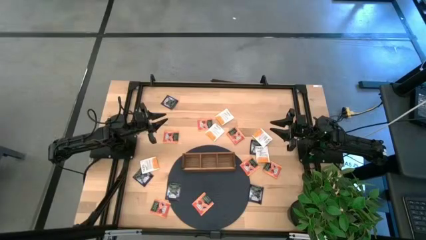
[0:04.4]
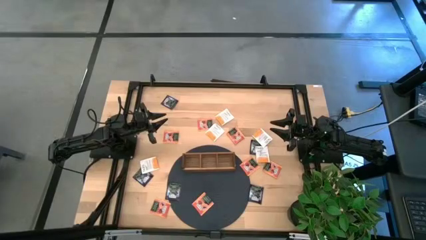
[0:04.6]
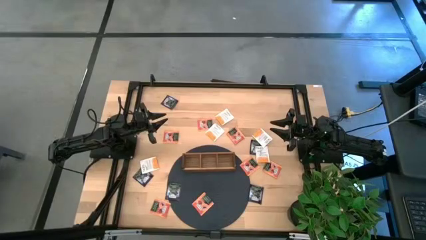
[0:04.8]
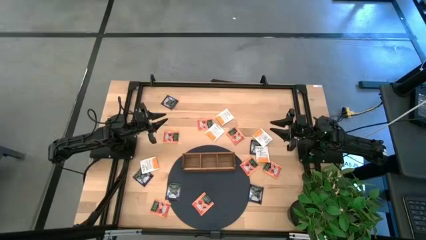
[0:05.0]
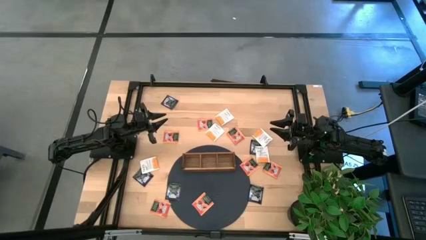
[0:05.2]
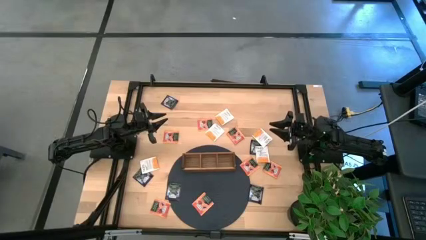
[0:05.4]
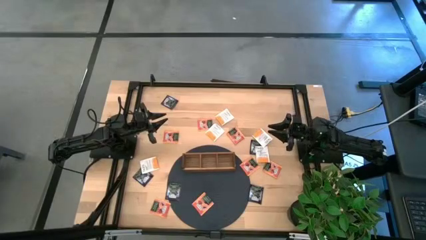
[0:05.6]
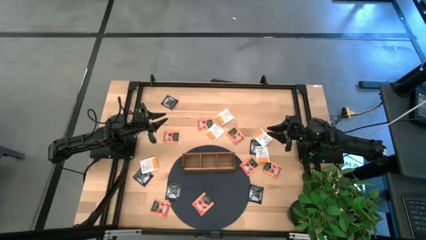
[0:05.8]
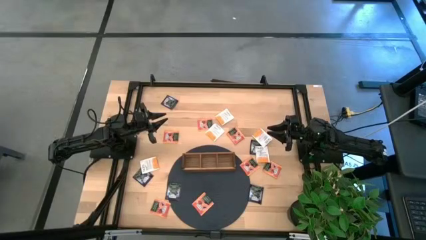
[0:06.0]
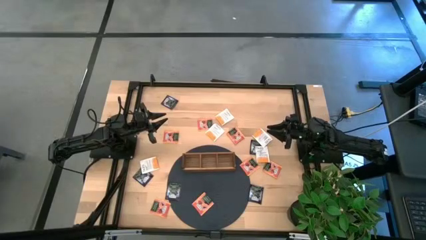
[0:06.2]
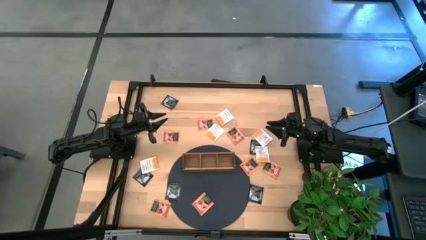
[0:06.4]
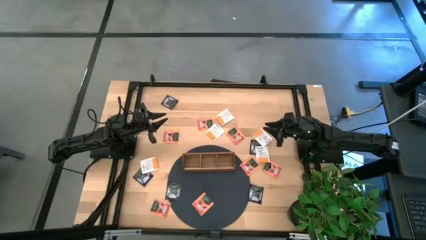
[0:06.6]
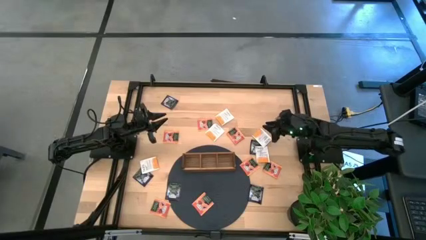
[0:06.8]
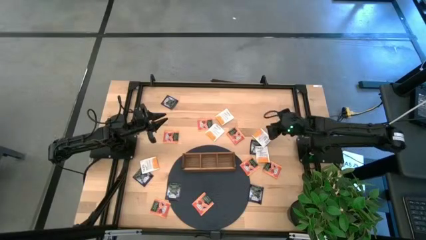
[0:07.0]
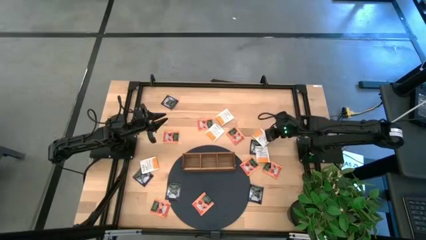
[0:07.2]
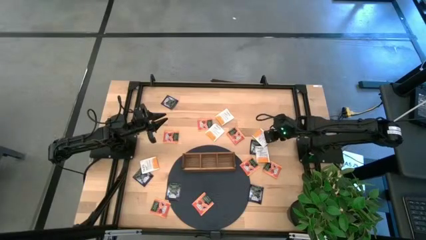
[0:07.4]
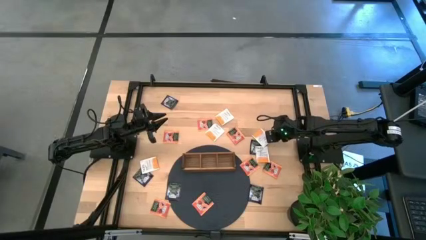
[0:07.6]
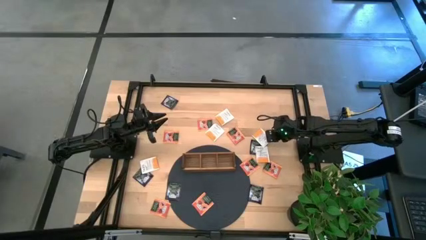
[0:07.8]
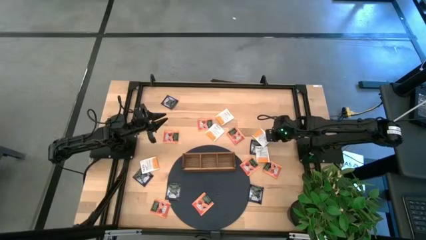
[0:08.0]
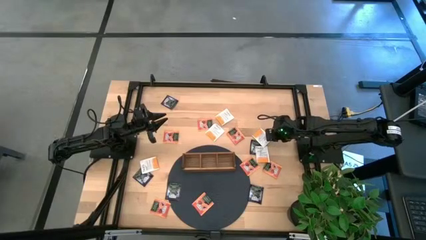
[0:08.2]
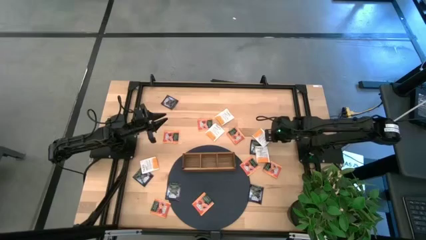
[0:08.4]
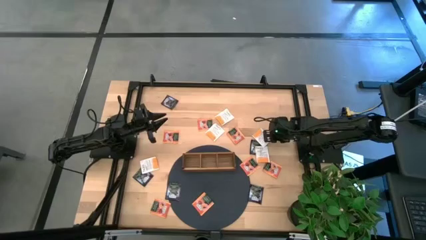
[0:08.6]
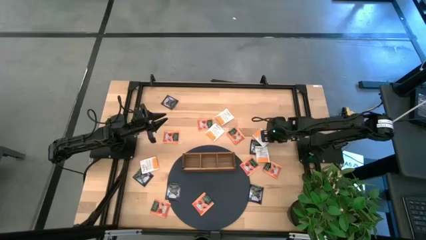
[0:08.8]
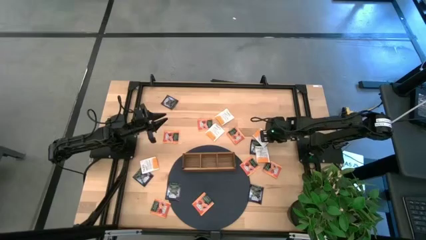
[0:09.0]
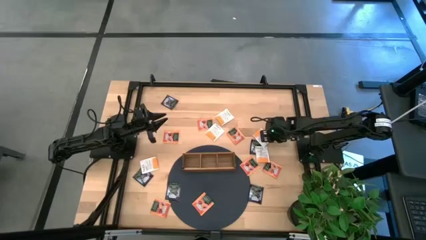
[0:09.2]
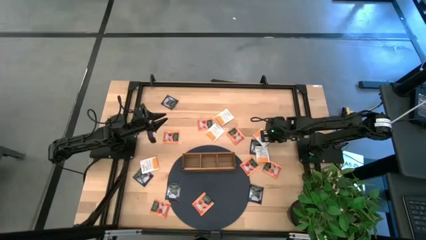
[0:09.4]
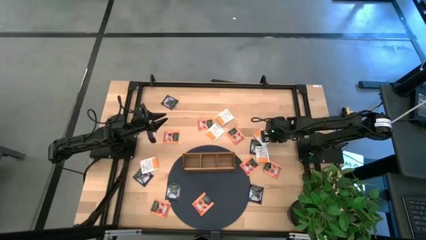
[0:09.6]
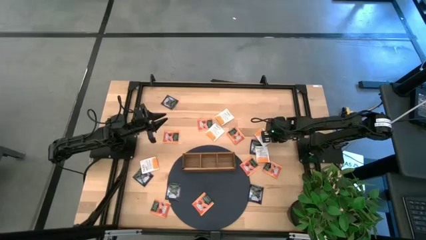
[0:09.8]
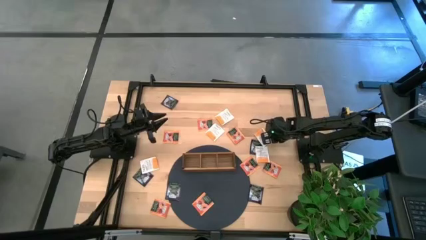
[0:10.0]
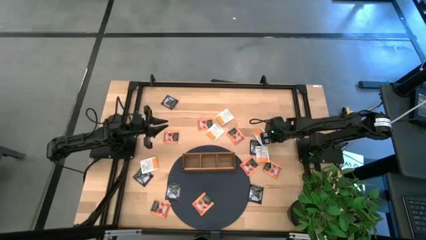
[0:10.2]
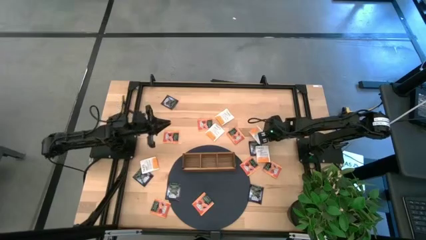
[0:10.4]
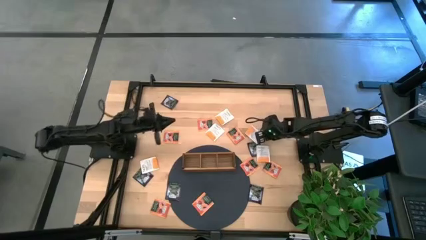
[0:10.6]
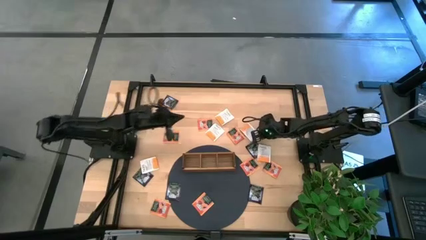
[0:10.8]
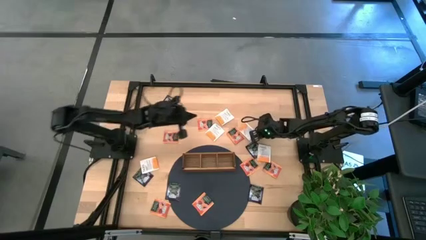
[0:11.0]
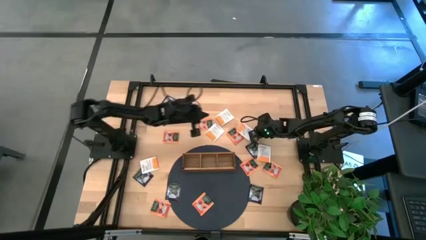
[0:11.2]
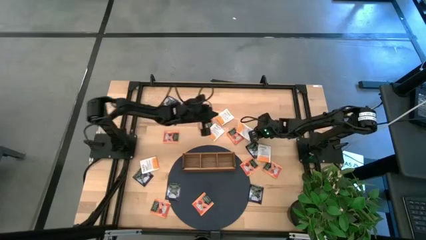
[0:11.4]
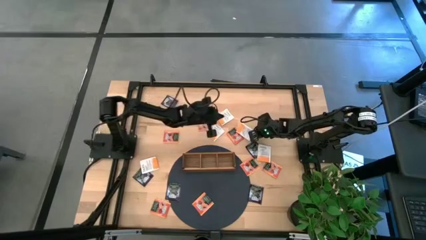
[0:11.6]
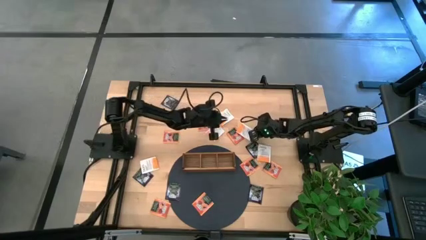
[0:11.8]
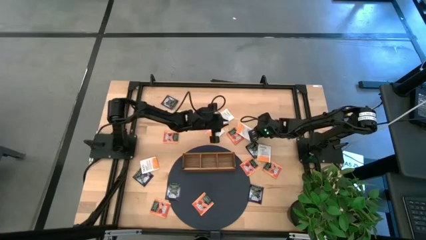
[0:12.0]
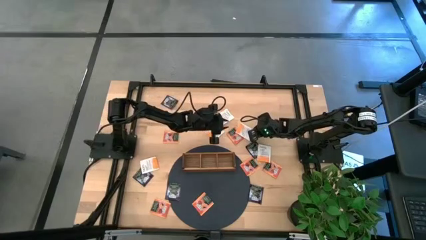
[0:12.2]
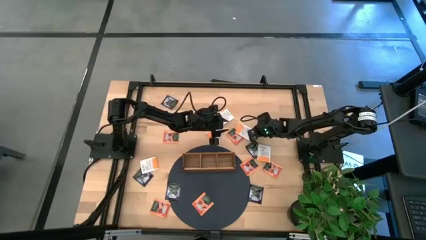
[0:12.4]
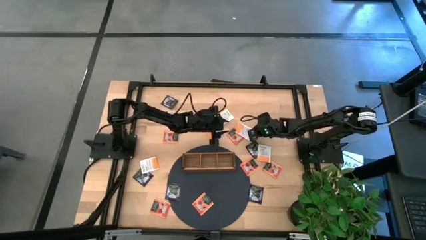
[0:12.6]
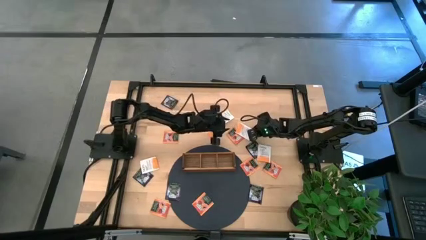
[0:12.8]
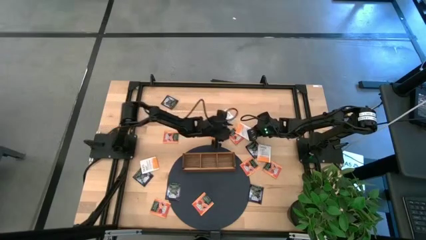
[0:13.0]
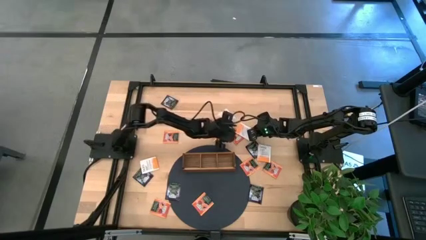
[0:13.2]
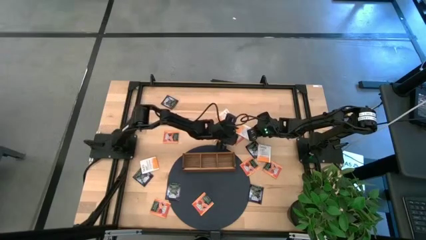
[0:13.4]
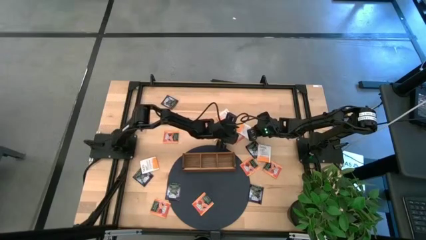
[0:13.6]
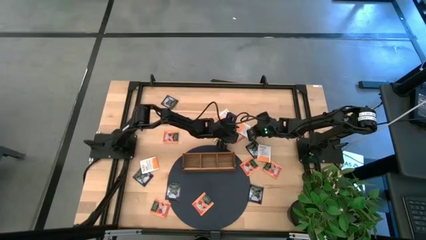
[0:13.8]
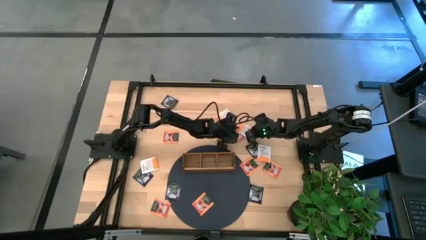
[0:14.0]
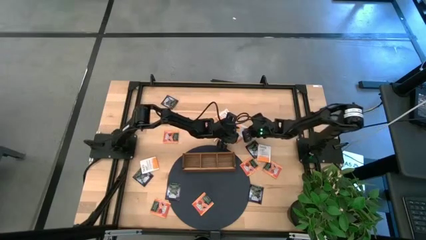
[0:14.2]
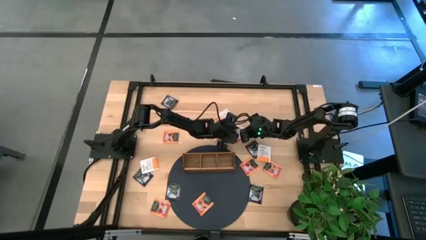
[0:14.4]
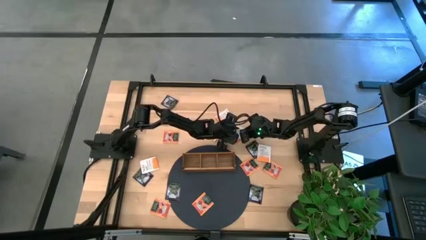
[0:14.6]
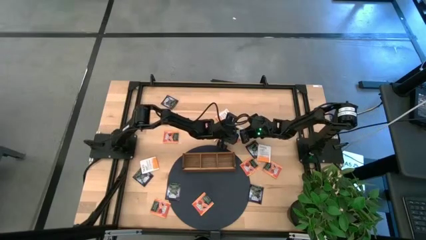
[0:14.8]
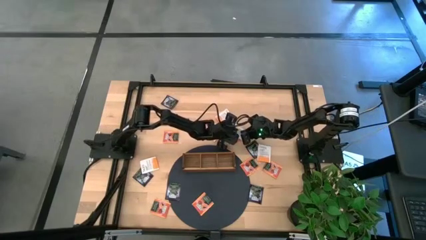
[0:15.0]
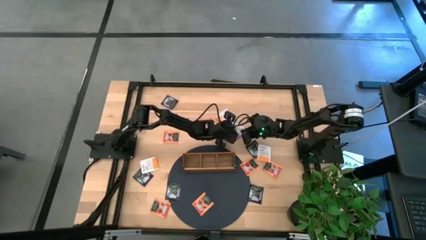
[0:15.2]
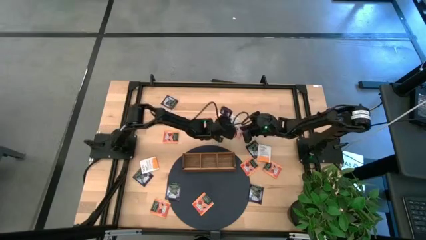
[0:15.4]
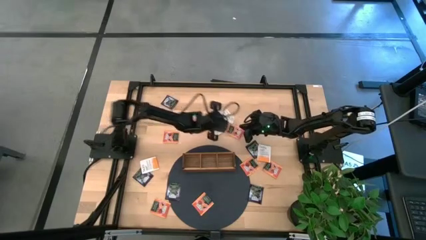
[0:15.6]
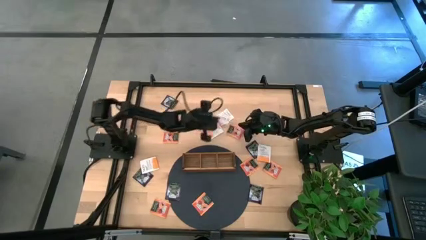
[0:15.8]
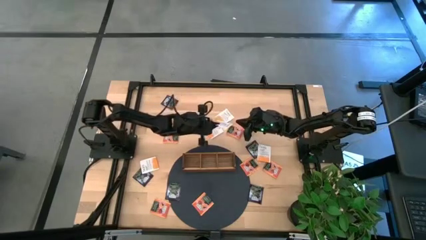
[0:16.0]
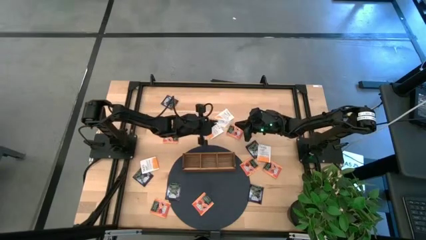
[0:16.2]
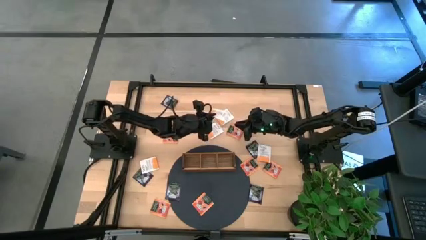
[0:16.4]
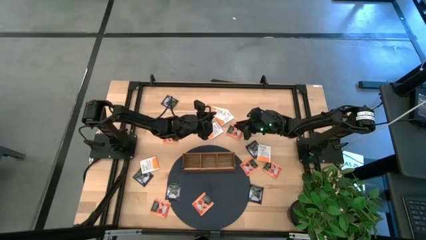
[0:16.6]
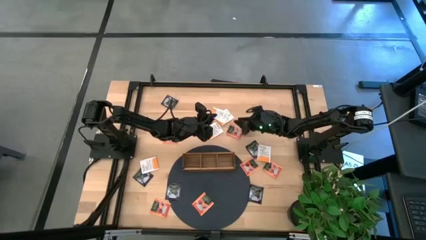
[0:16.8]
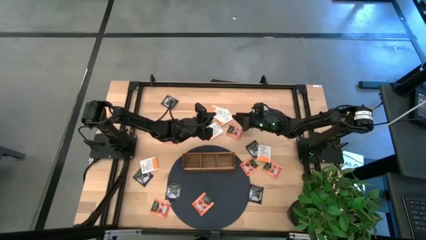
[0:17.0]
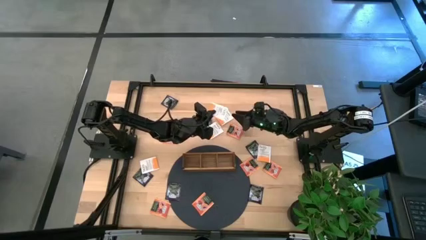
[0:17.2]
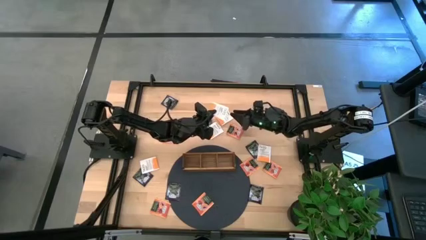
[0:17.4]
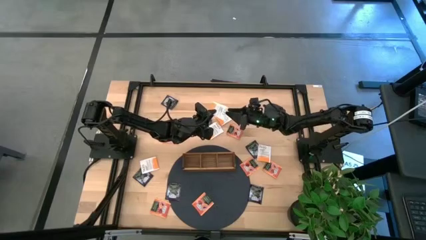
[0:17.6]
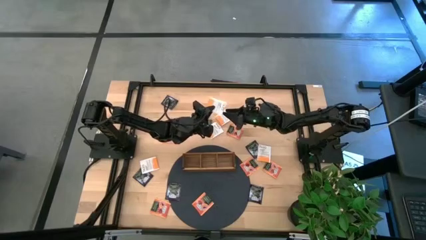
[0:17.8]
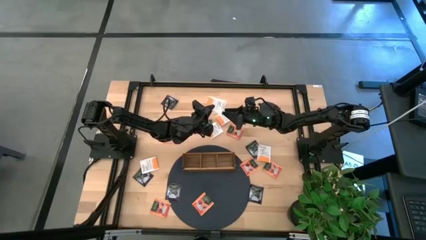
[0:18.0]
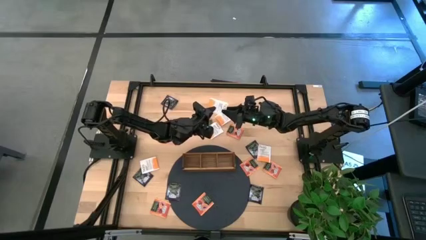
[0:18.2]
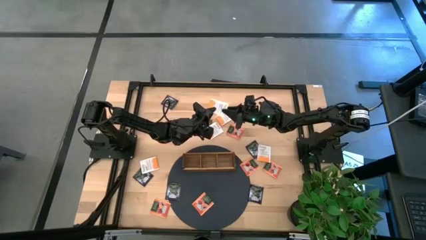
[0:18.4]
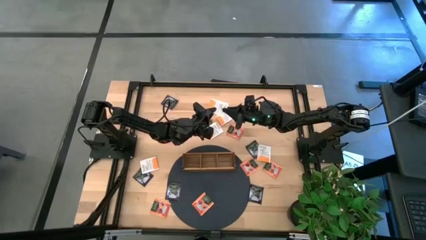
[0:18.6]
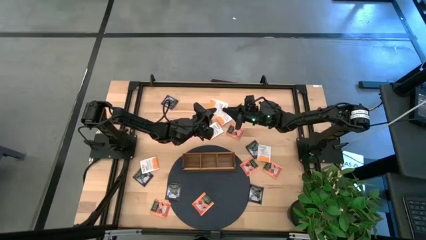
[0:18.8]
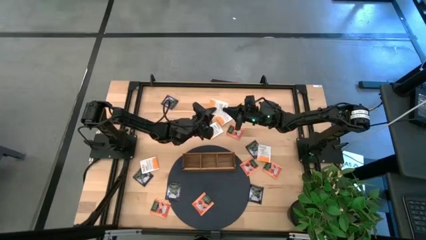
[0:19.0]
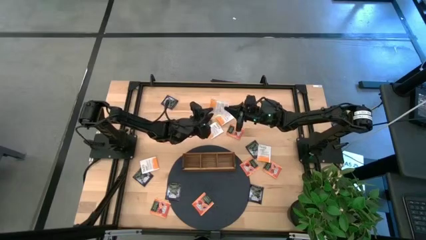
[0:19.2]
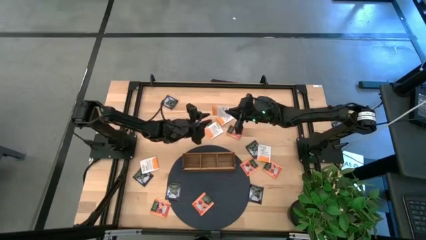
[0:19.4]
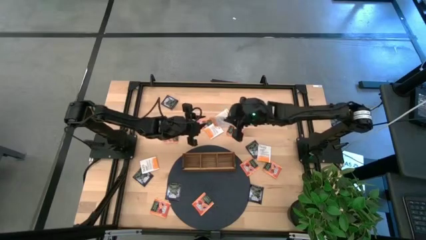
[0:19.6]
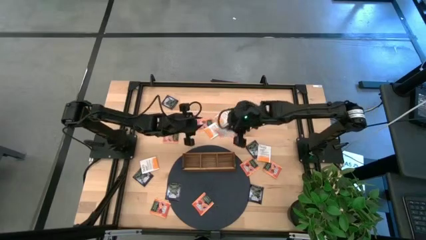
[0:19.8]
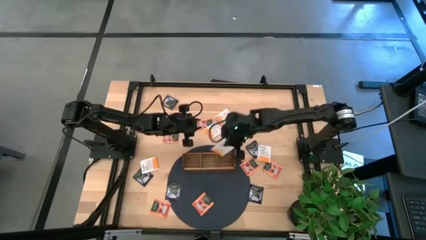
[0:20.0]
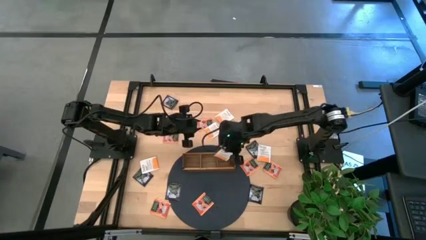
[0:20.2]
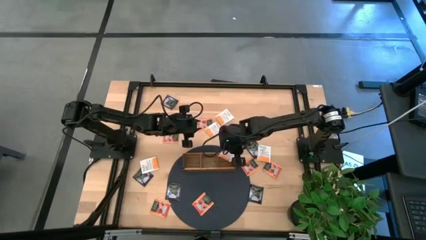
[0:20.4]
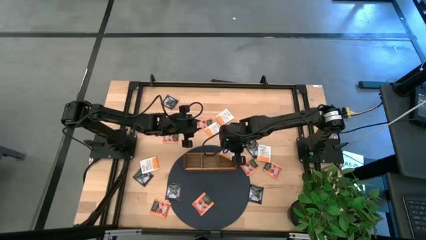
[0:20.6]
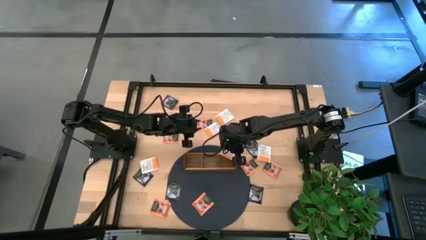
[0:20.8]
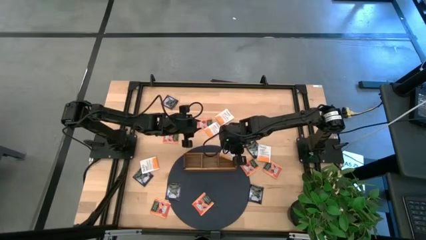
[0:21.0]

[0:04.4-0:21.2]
Task: Pick & Place Tea
Put the white tea bag into the right section of the wooden organizer
